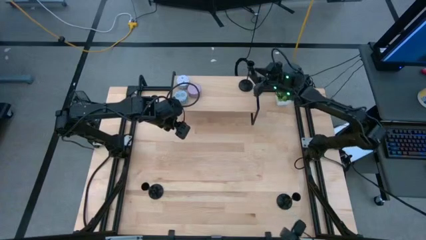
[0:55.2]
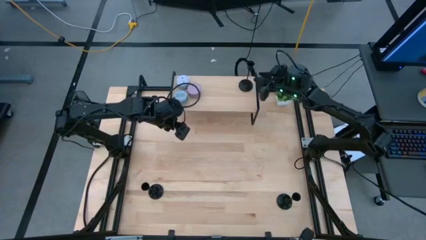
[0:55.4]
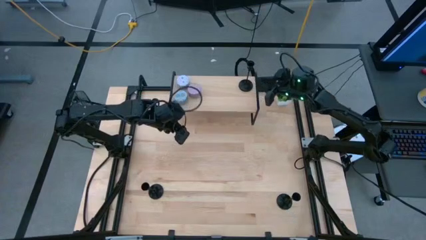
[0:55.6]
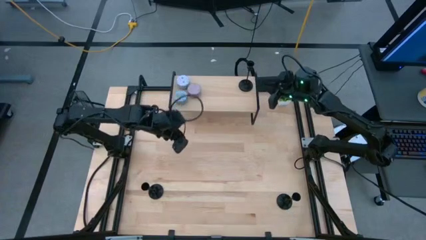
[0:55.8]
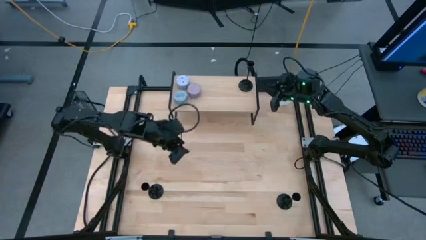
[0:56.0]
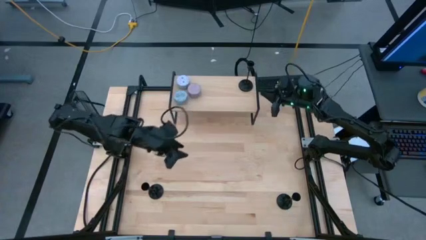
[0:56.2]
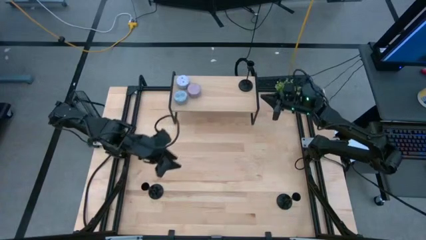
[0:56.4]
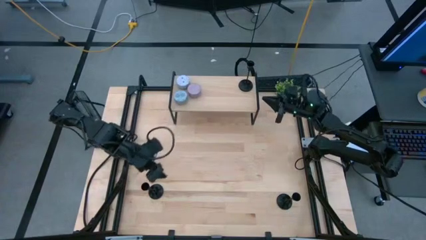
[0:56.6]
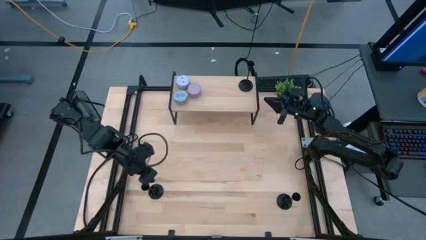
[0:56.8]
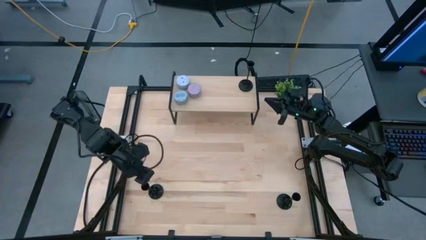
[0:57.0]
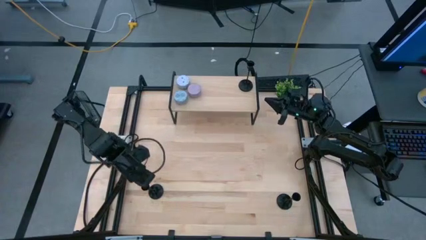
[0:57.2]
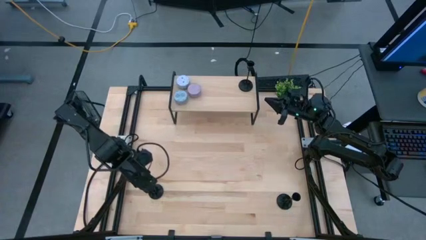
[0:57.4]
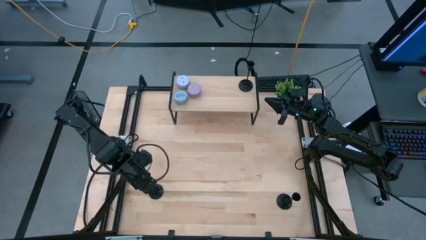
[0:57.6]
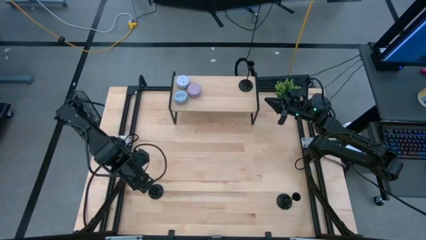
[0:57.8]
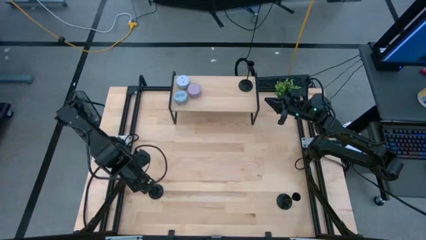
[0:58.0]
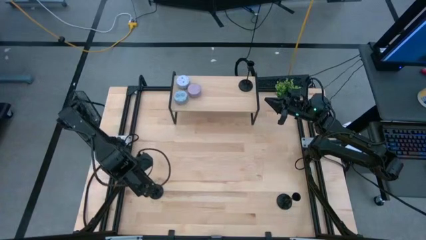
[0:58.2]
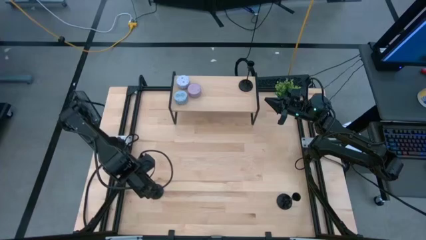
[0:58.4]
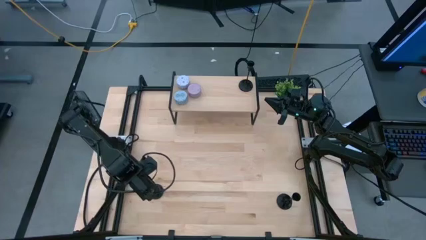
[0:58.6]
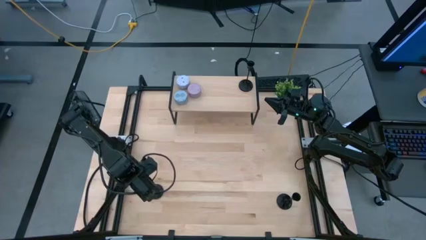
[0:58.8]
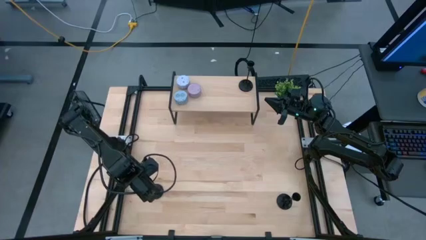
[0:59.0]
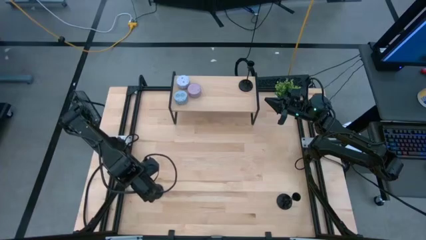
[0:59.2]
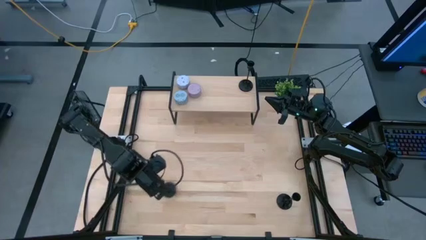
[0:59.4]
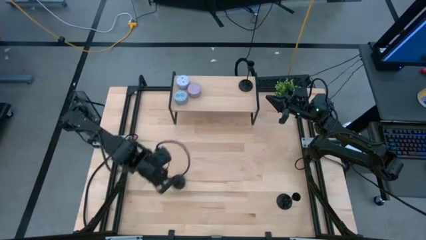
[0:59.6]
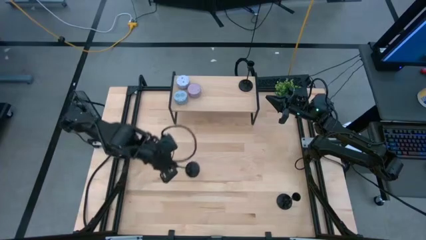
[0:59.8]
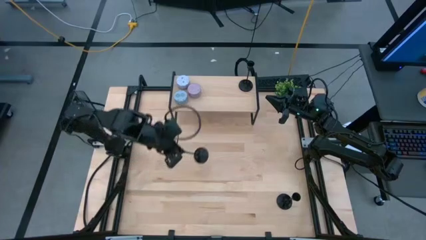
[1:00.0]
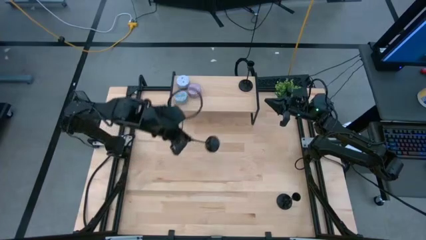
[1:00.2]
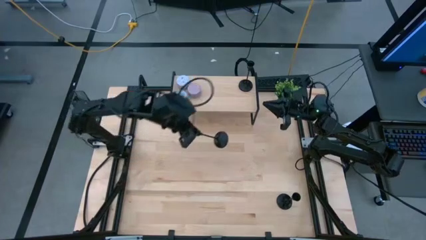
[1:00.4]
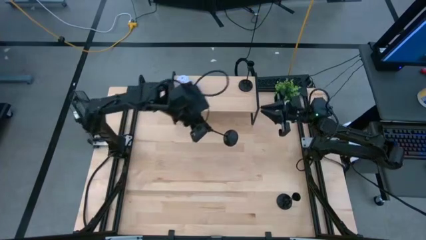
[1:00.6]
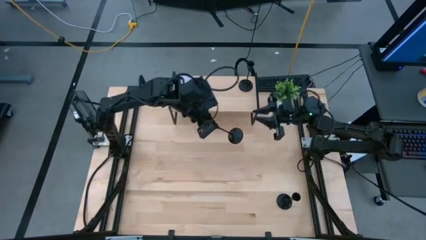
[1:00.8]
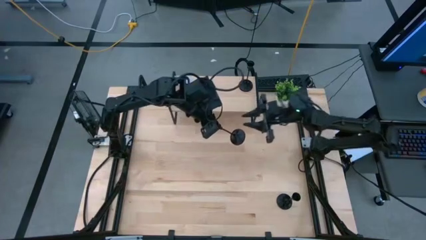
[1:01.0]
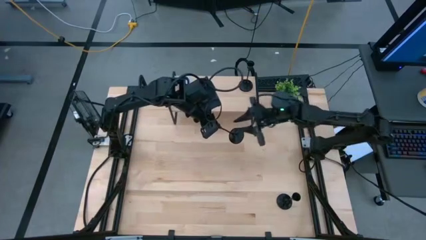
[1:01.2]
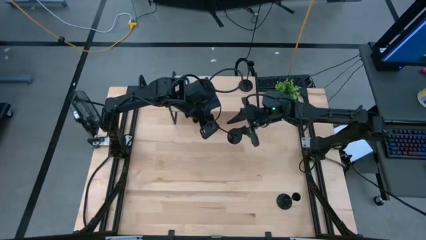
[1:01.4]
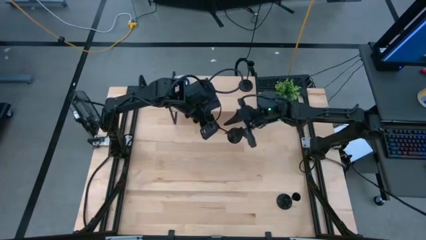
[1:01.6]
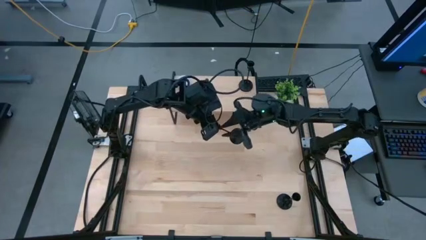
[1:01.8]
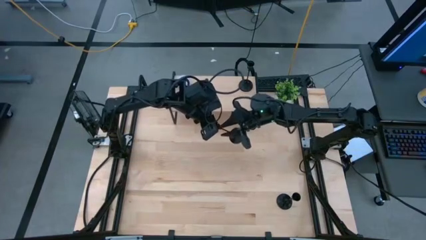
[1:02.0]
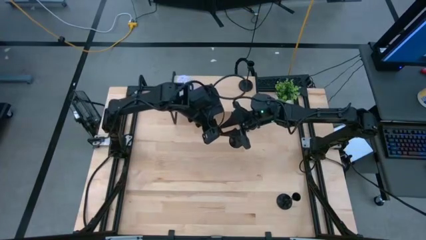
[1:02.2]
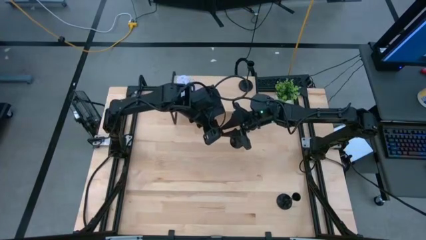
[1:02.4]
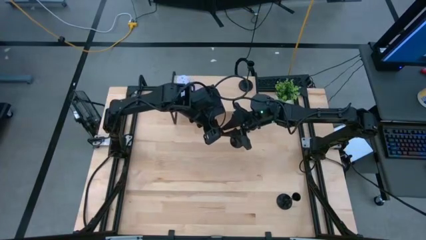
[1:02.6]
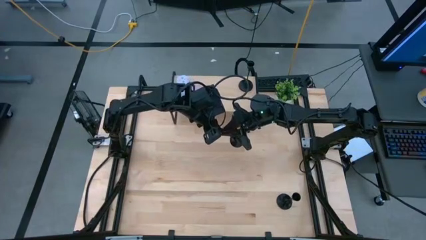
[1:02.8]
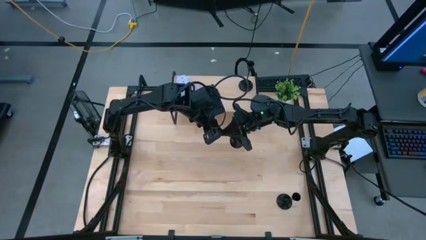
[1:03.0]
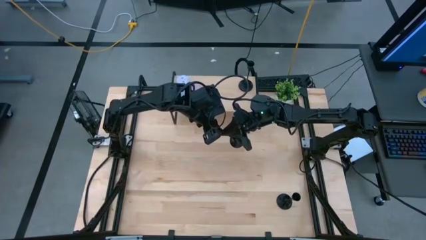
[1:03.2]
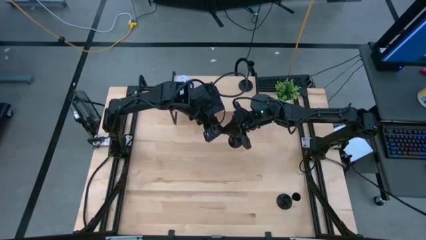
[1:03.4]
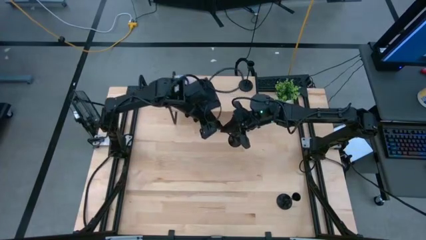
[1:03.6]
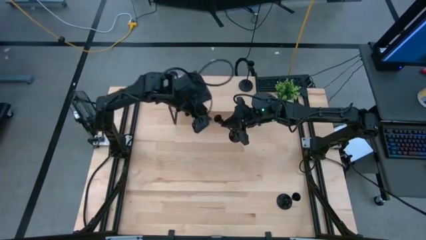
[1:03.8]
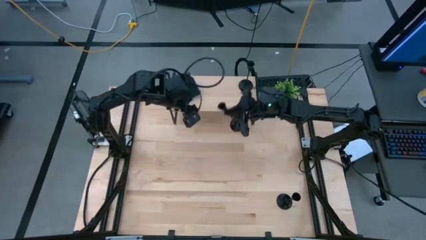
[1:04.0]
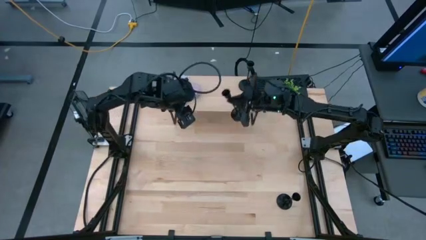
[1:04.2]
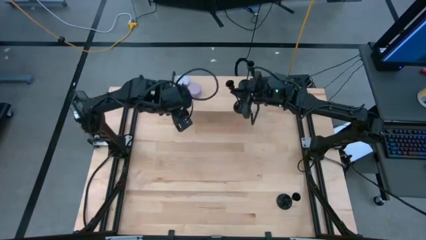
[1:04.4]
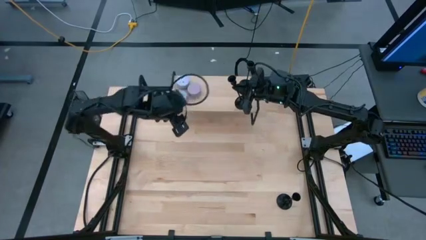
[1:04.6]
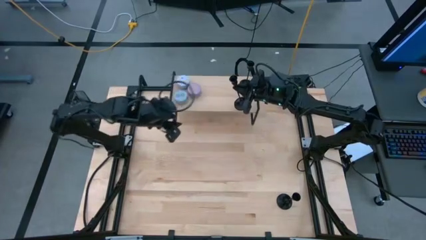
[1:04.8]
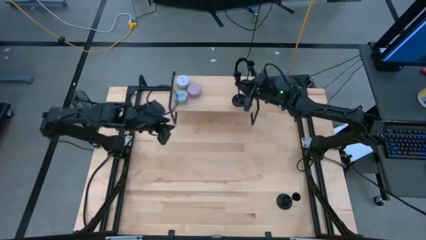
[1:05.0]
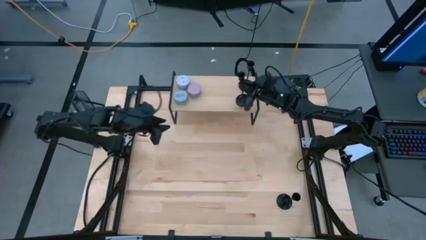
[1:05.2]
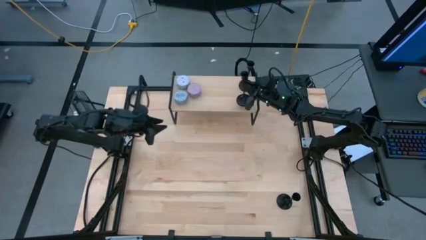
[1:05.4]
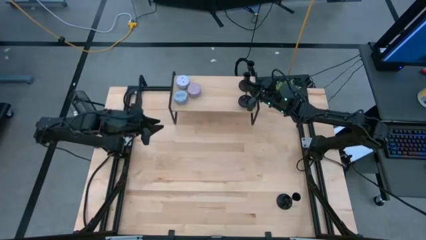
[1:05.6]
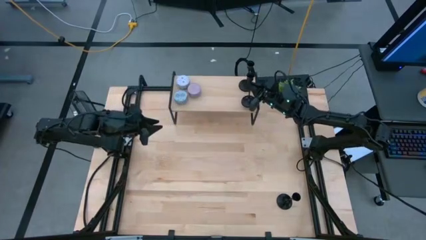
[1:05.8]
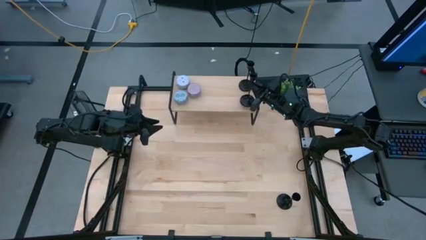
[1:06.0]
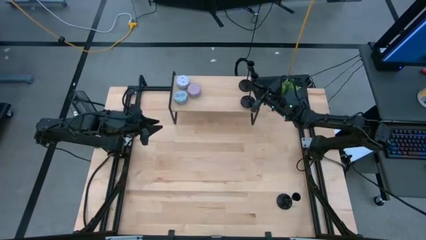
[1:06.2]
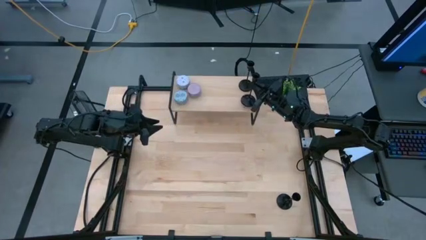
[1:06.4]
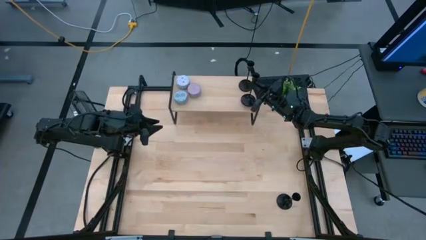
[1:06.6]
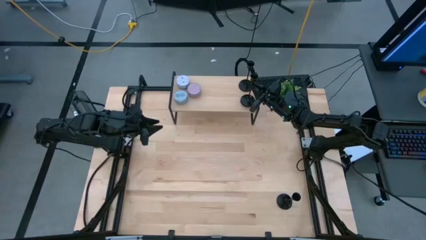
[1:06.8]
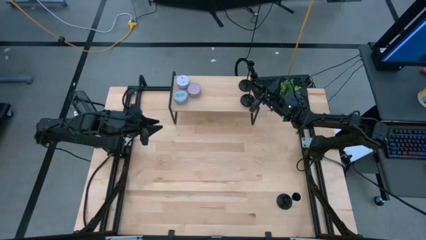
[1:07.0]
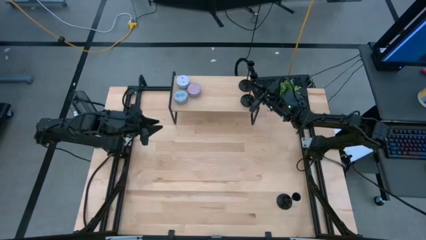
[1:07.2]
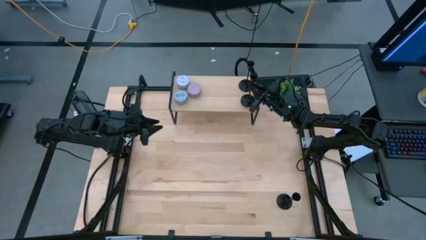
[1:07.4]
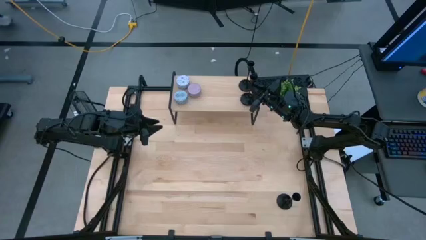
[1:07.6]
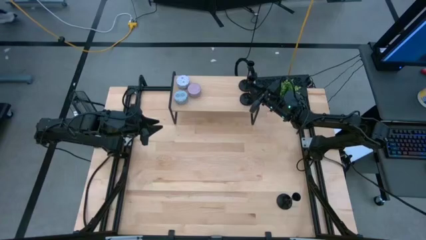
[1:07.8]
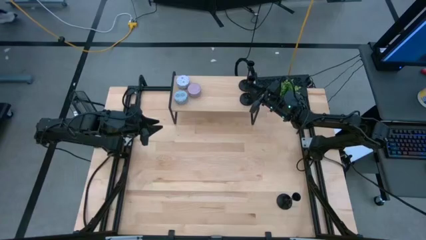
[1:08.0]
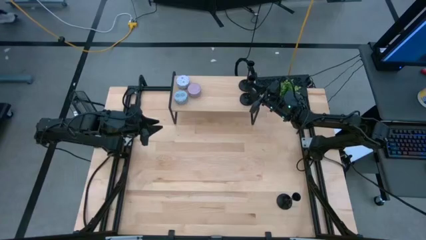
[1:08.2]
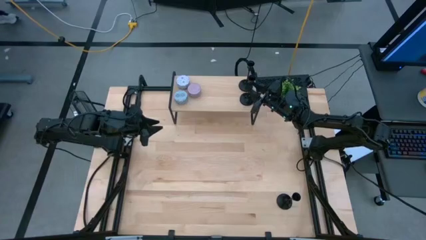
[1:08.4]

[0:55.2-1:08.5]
Task: Pick & Place candle stick holders
Put the left black candle holder on the shelf

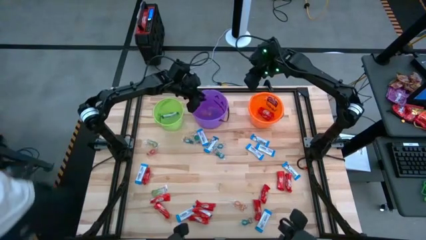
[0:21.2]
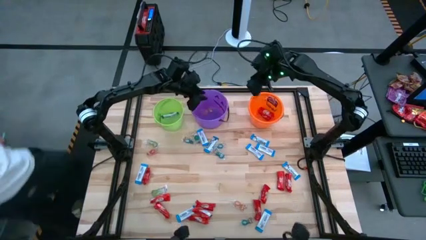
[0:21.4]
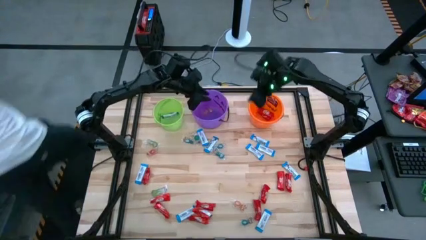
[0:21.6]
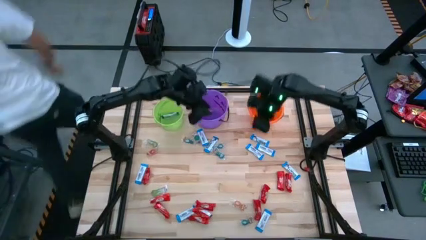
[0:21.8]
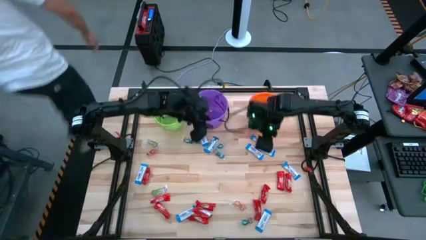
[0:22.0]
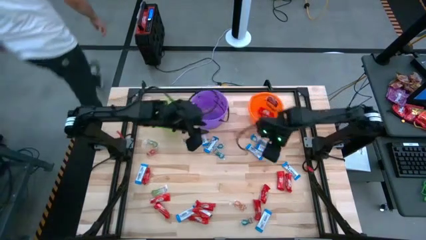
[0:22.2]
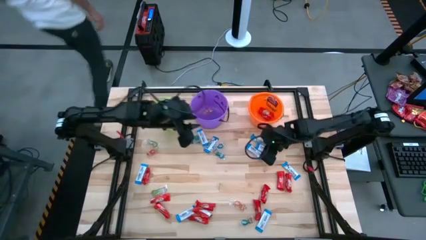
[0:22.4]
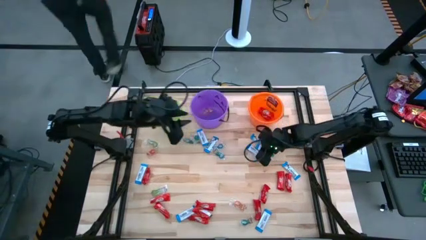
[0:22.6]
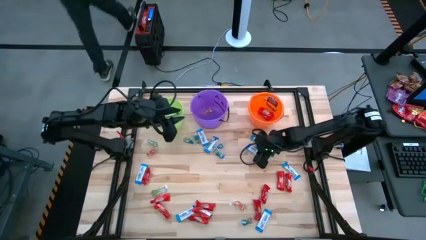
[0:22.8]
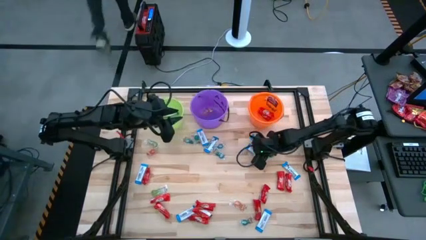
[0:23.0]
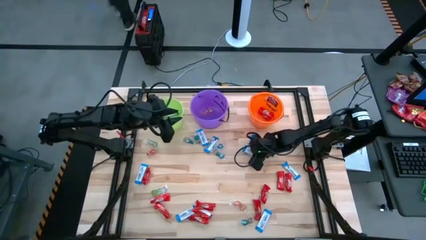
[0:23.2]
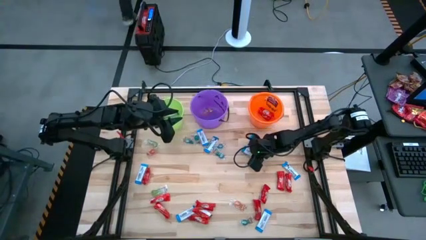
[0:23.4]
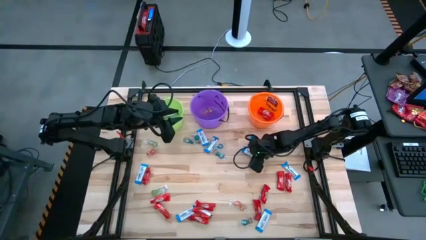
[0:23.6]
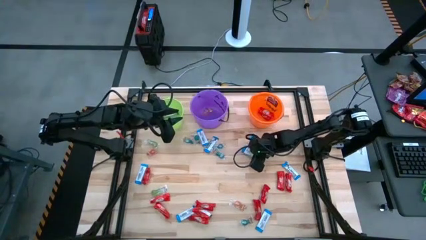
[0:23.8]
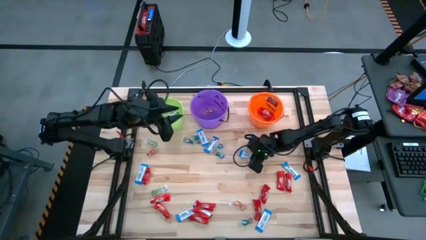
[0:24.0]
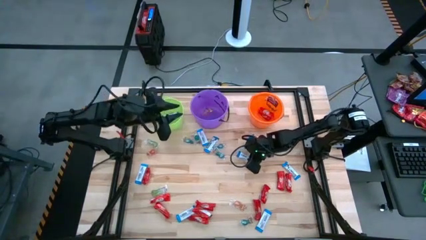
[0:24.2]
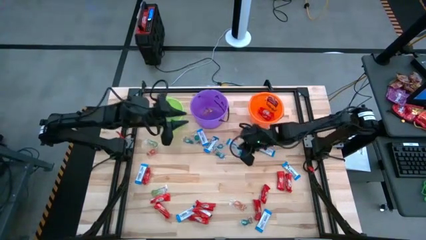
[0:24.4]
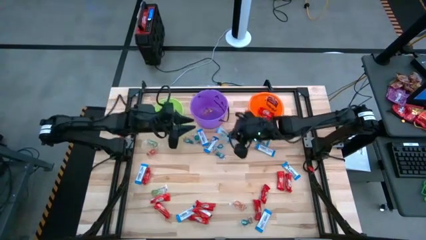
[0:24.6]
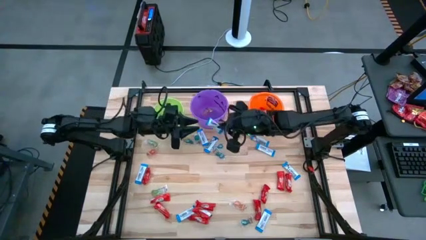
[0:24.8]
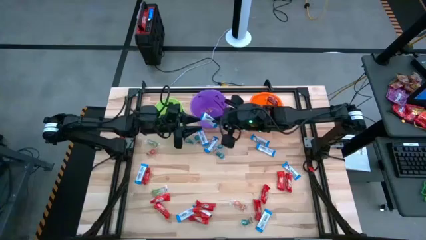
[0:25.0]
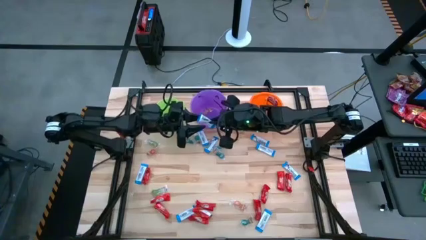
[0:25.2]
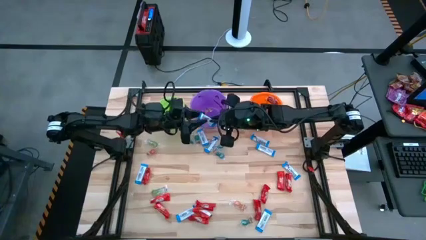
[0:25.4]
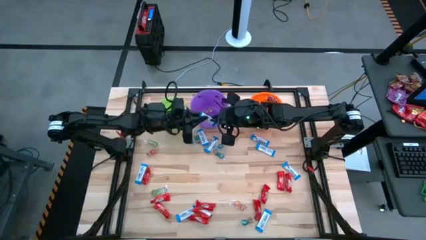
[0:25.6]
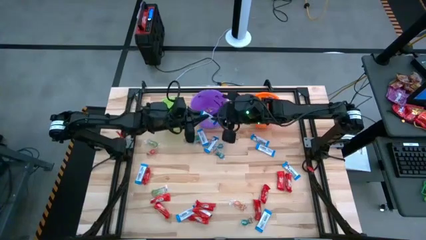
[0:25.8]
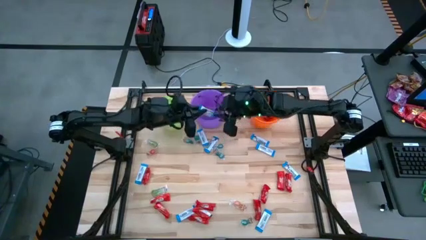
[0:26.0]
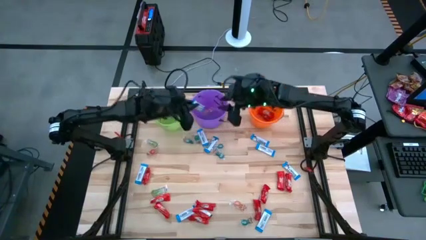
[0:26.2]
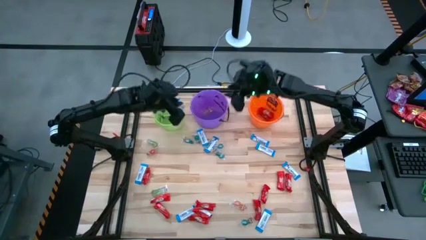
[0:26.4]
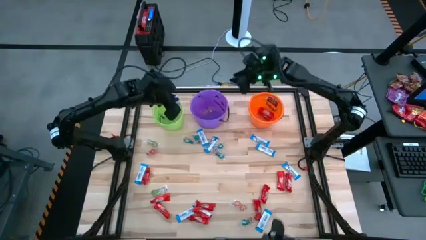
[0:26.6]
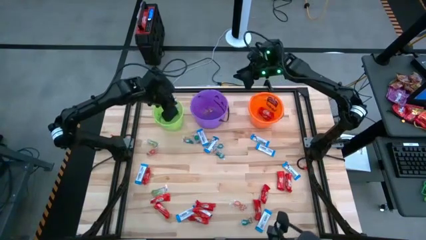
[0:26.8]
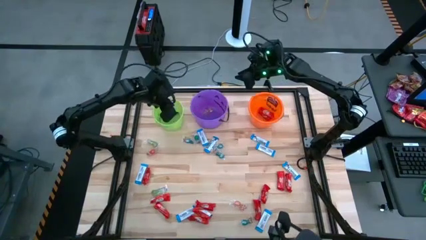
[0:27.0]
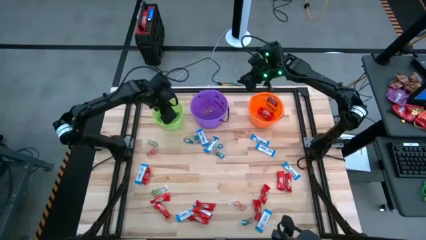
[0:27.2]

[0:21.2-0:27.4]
Task: Sort candy by brand, put in halloween buckets
Put the white chocolate into the green bucket
